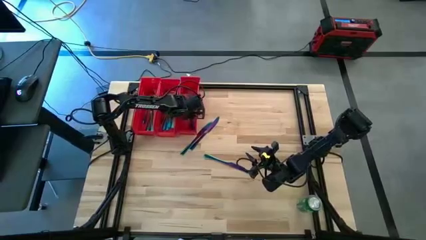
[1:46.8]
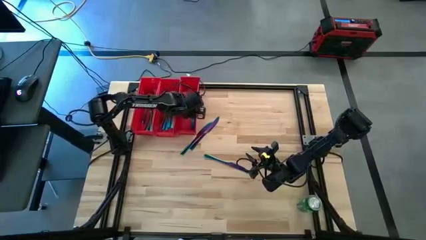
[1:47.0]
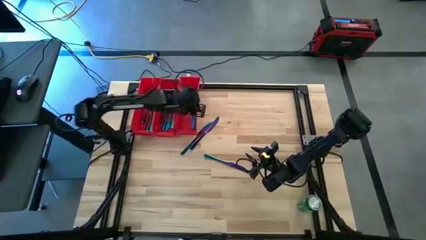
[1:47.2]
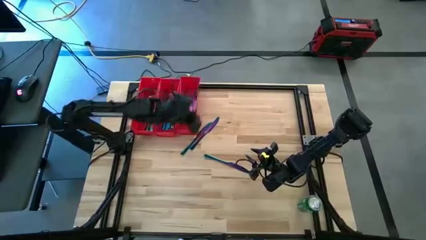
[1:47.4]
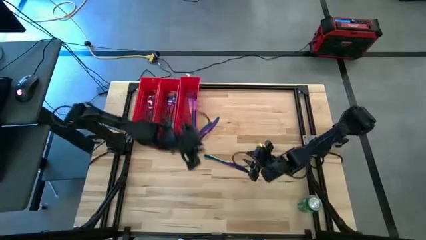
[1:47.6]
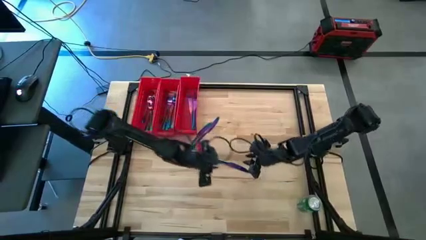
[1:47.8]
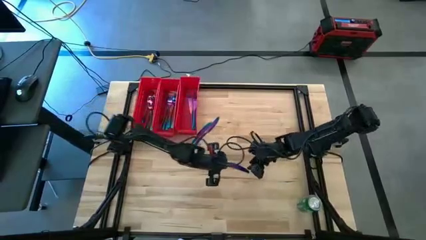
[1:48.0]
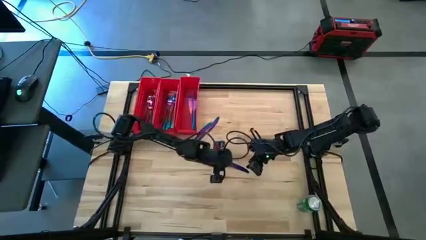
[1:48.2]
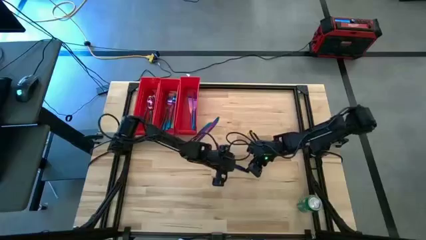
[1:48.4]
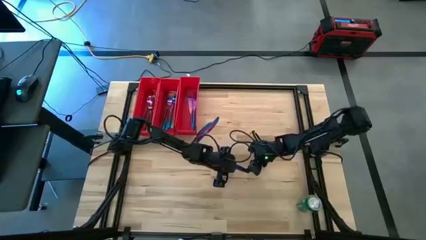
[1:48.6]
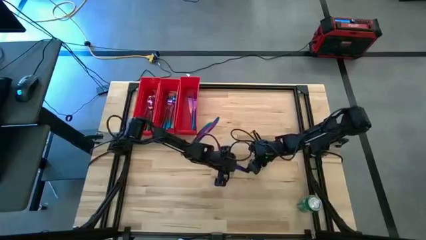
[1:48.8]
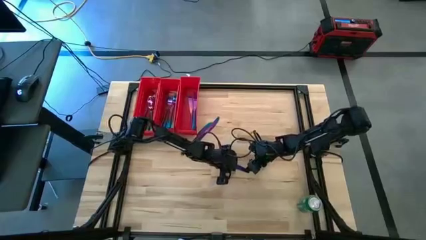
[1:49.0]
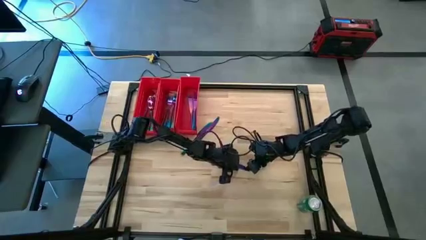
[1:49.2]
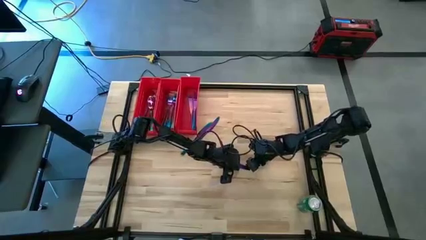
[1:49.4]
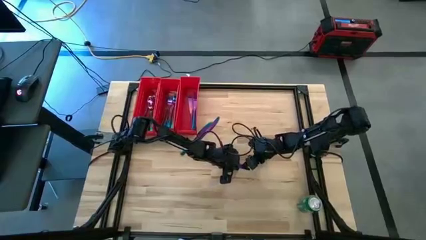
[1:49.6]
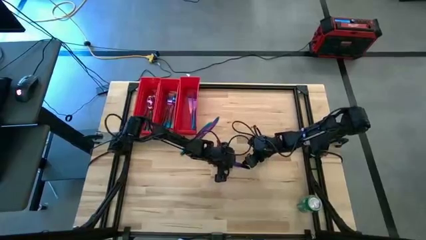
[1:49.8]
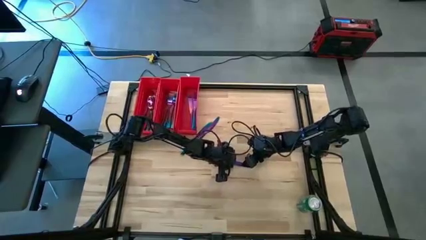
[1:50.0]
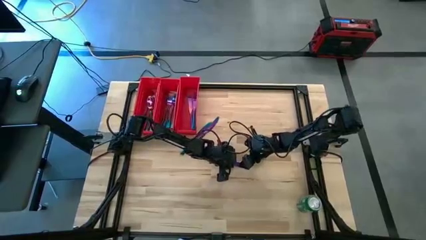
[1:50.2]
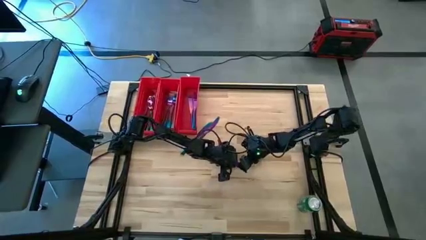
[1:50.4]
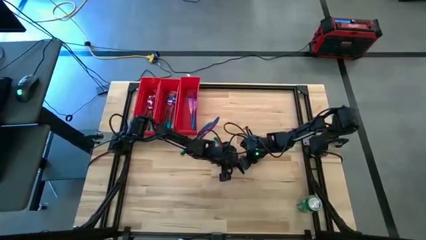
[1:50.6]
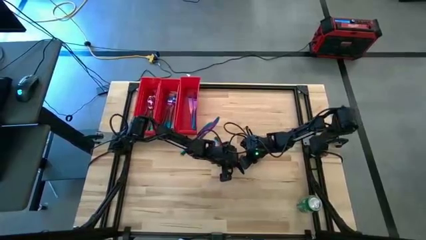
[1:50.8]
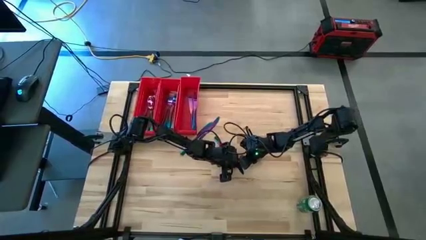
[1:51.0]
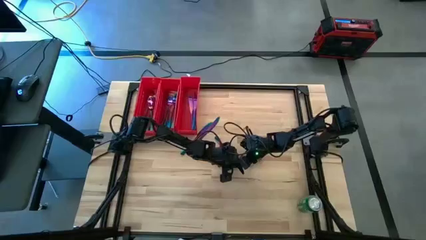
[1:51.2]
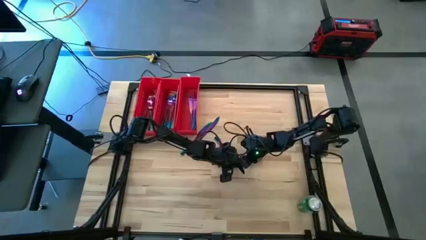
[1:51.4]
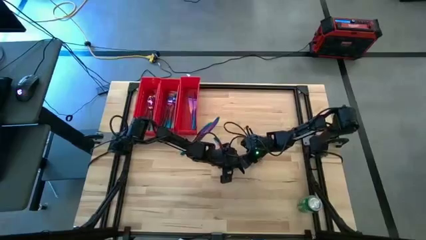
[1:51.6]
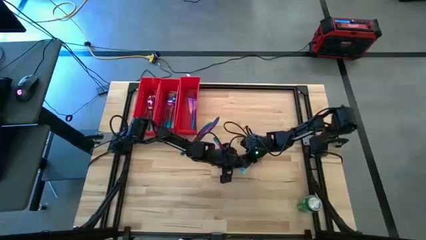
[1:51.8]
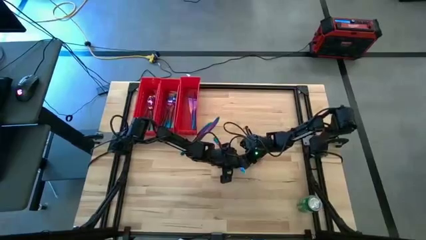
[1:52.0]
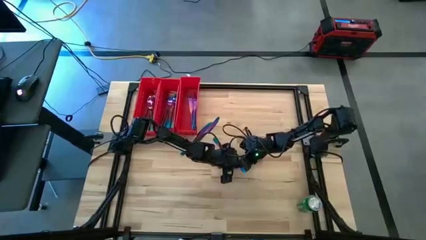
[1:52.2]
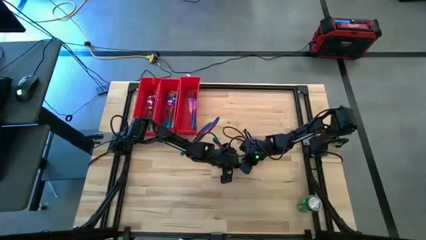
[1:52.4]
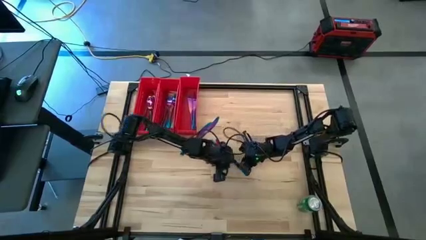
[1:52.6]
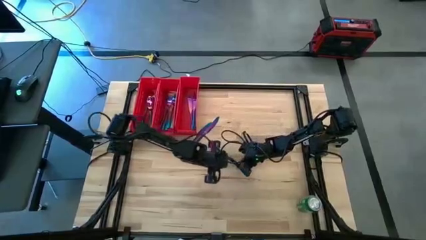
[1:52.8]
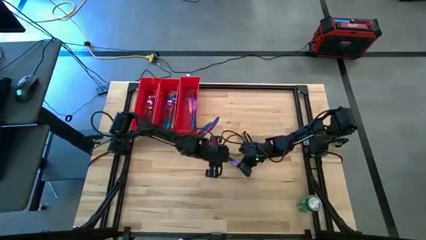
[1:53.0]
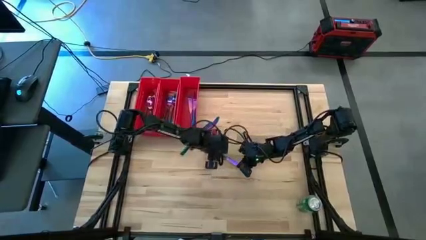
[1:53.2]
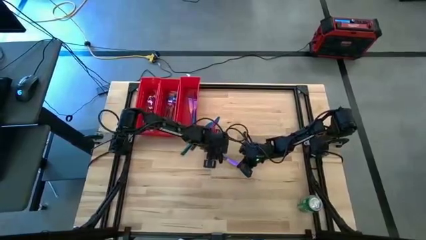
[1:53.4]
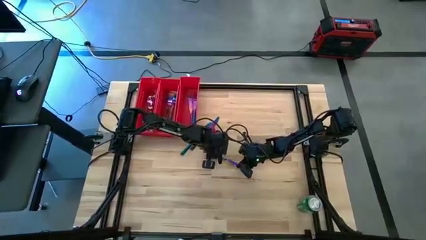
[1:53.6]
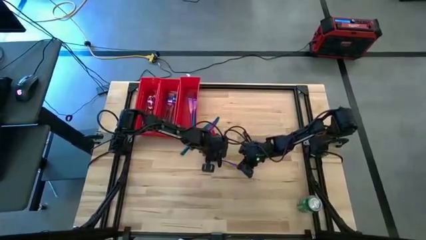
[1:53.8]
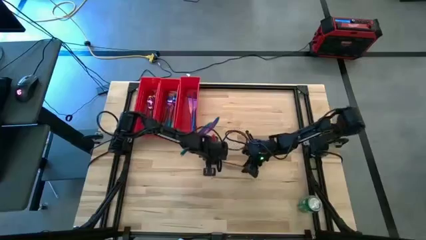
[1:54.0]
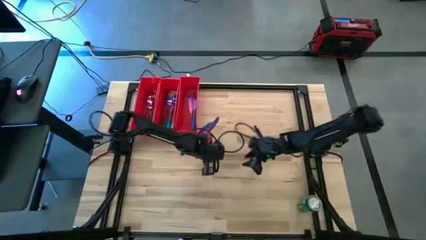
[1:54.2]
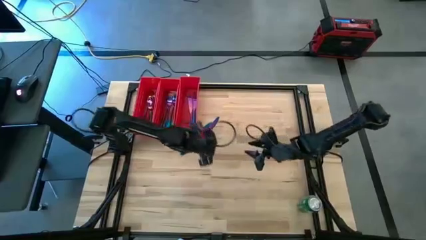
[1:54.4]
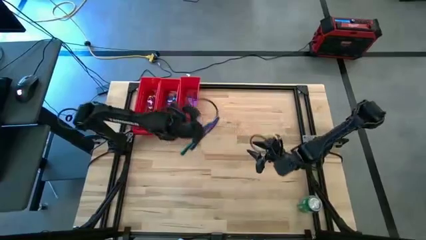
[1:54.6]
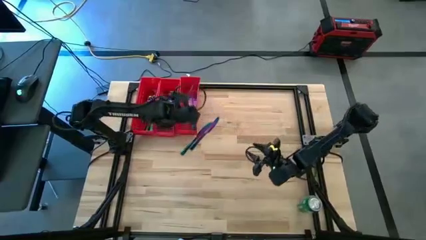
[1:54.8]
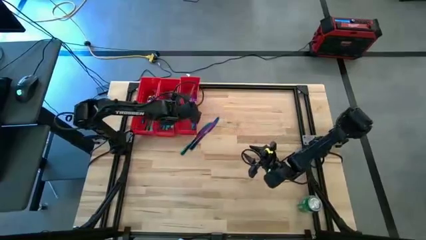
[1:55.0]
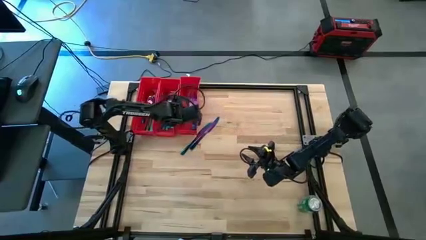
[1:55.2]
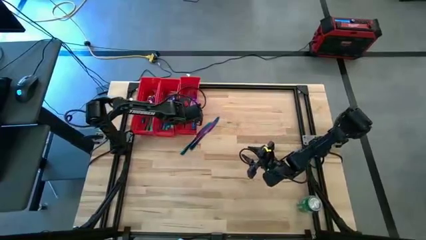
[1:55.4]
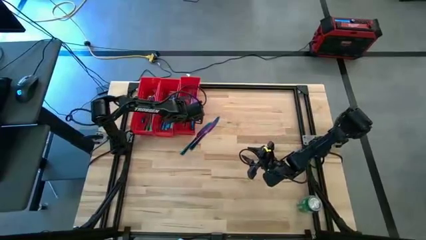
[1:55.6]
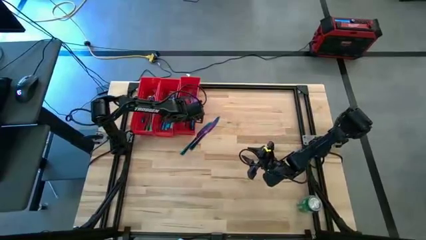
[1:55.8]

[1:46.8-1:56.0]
Task: Sort silverware
Put the blue knife into the right red bin

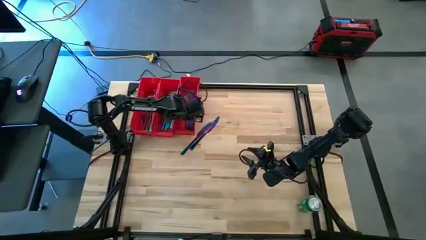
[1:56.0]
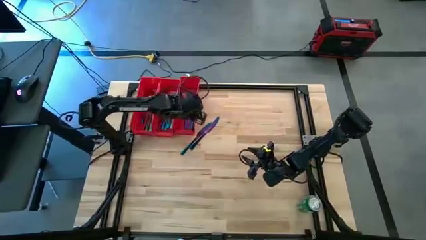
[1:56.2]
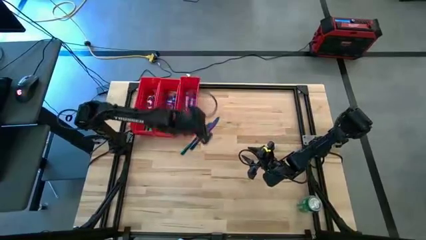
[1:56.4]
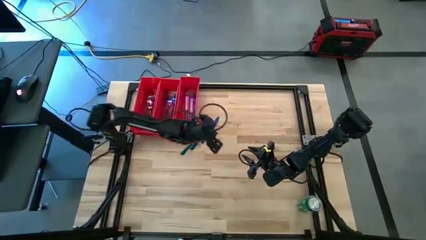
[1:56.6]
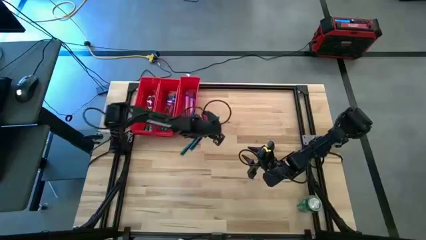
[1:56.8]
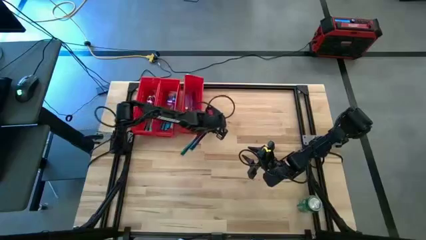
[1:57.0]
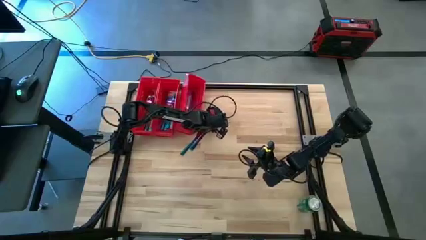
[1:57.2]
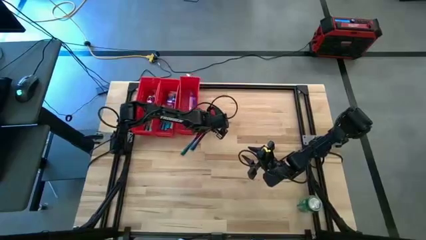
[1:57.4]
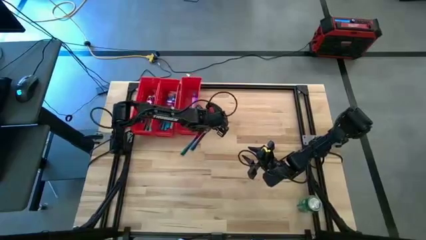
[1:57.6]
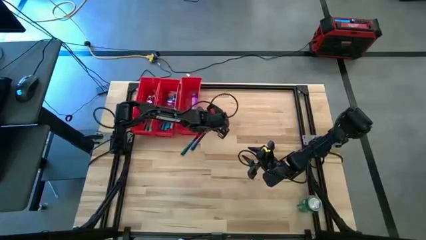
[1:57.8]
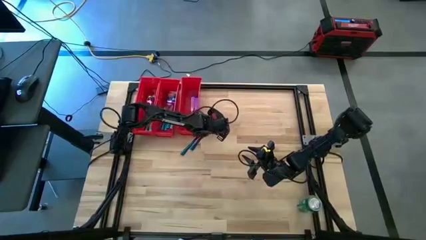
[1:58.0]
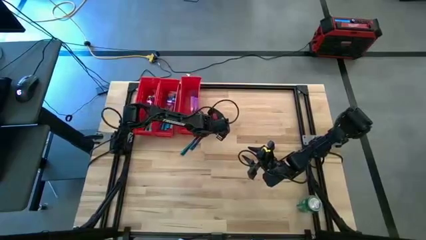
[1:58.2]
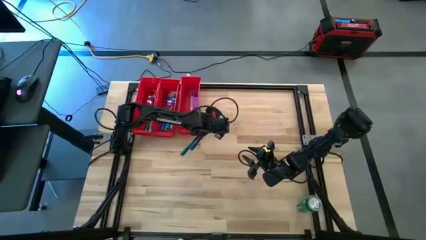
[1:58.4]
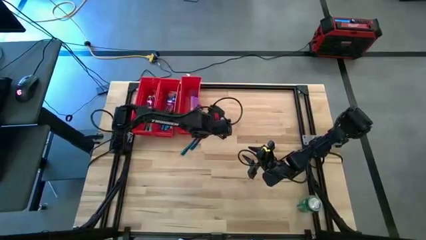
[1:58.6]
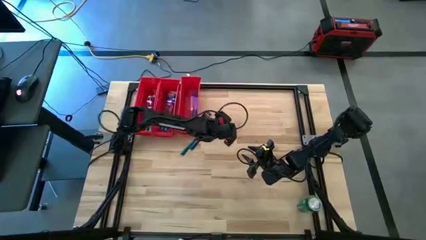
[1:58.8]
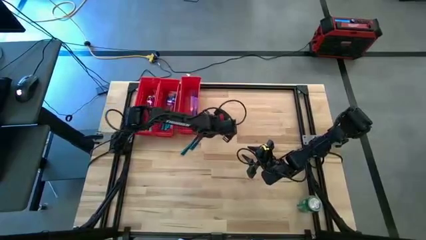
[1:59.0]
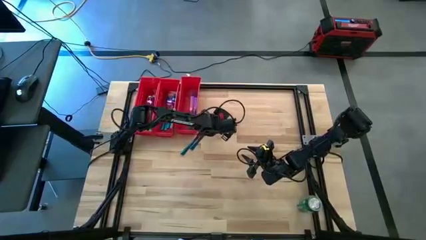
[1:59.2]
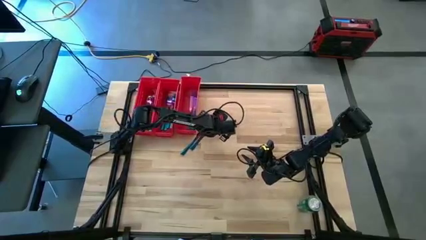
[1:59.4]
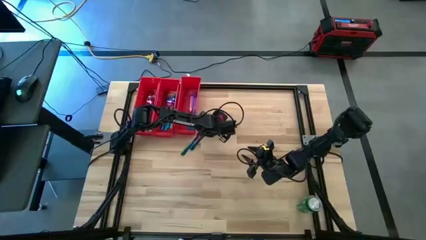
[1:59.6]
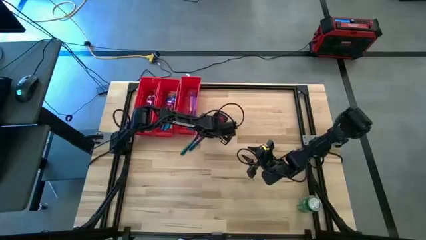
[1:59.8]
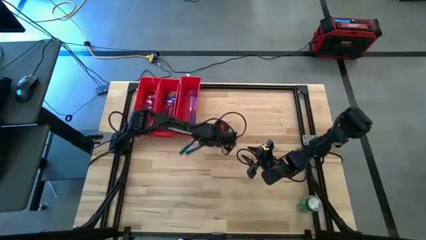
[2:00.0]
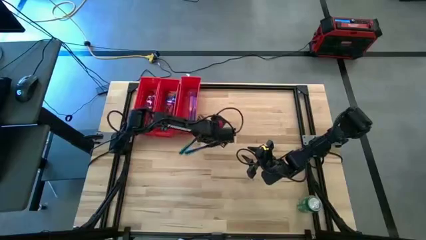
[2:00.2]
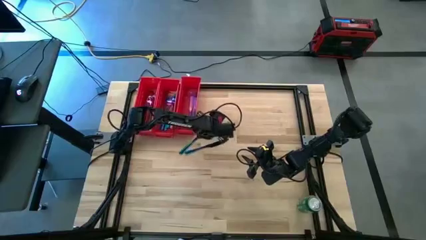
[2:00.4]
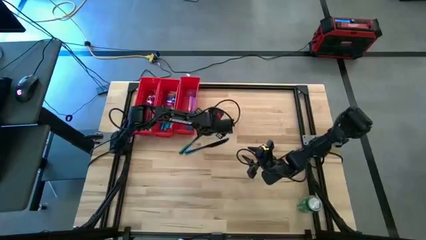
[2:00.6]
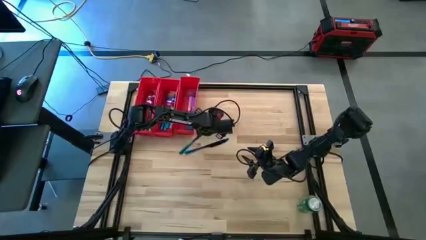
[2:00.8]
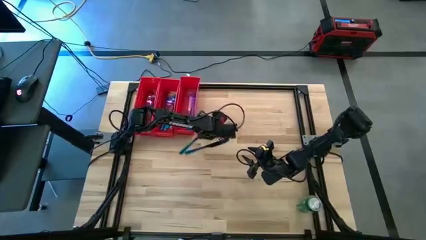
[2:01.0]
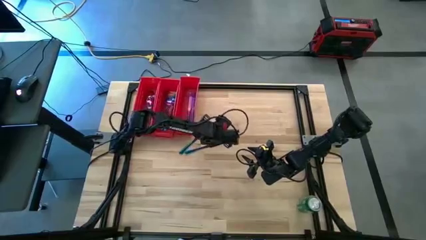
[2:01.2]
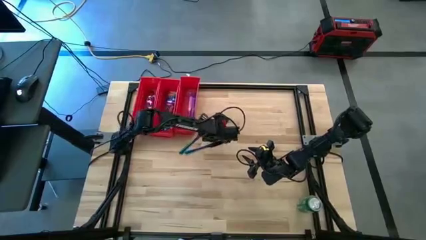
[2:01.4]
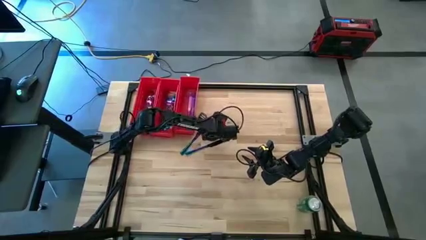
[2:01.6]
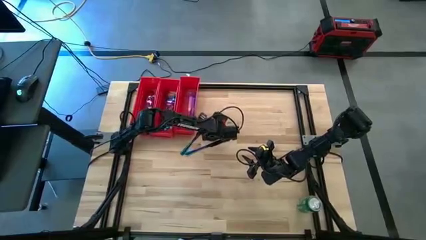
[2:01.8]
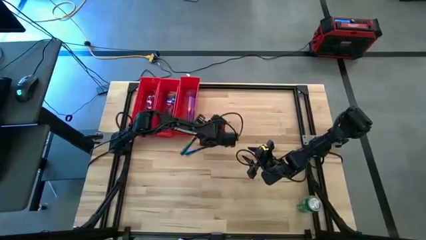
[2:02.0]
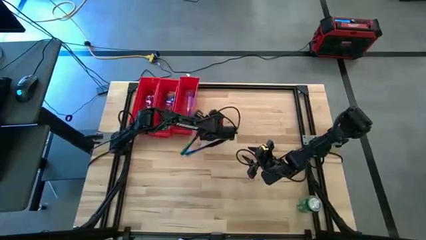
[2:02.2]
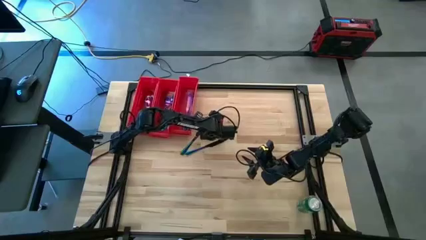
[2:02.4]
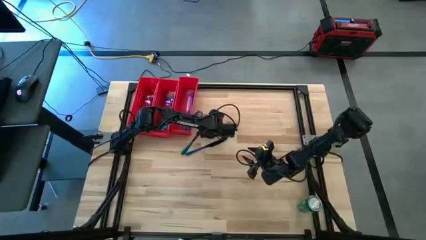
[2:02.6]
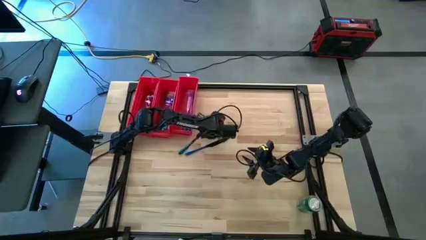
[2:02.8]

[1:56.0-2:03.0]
Adjust the table knives

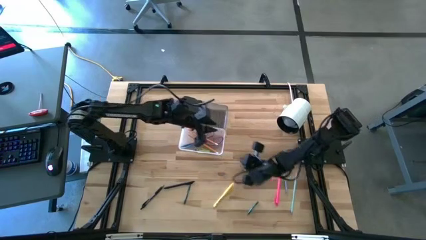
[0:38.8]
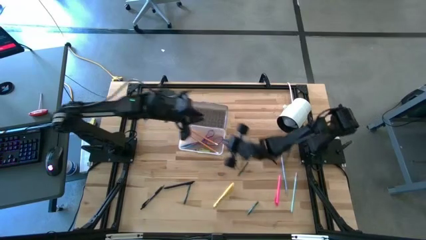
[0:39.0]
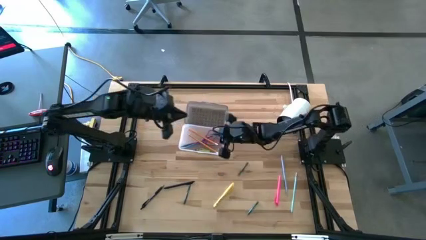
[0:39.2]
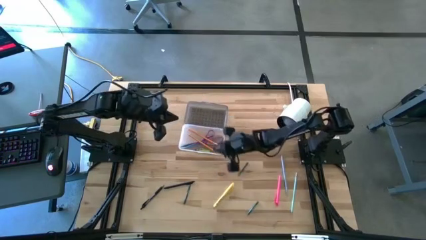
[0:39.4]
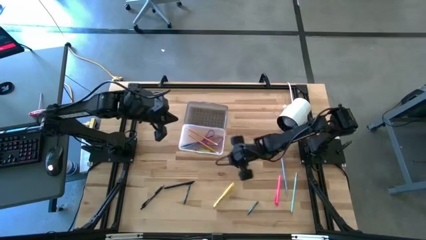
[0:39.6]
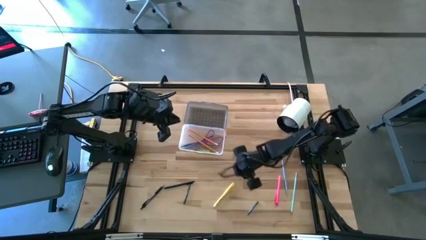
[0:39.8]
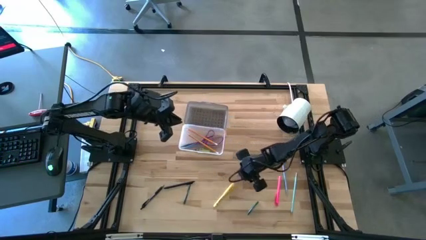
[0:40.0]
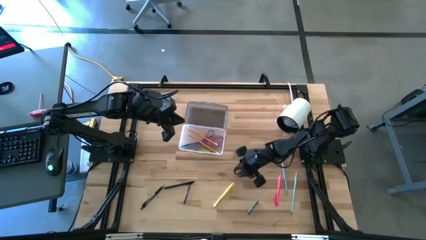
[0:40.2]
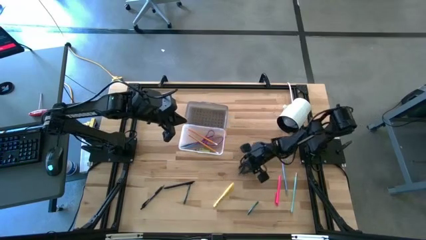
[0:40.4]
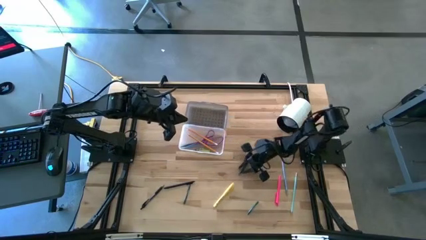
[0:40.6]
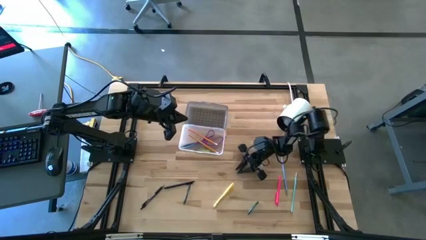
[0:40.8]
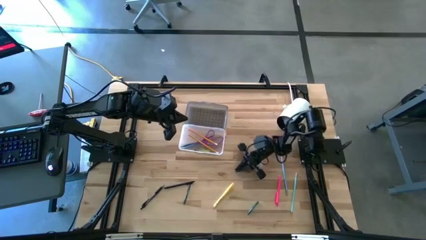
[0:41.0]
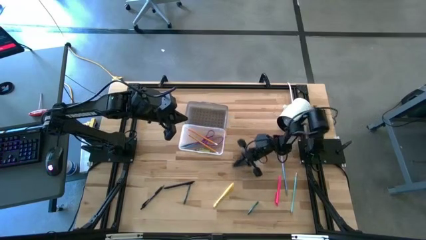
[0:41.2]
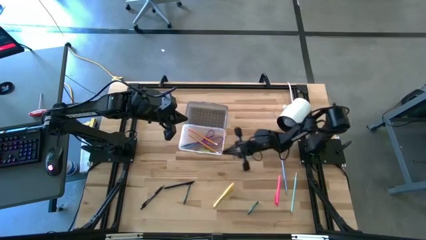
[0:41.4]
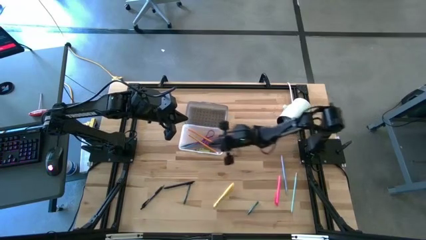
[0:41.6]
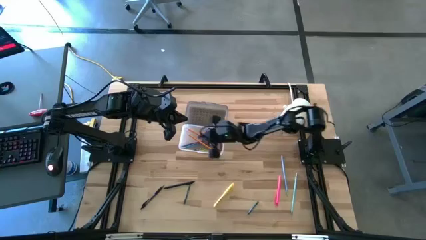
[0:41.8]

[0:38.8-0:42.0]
Task: Pick & place school supplies into a supply box
Put the top dark green crayon into the black box
